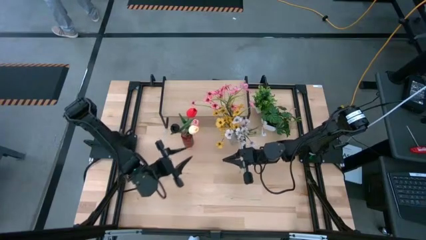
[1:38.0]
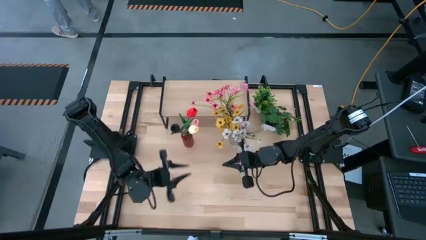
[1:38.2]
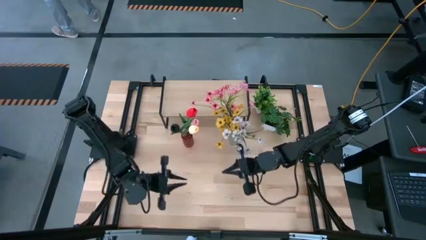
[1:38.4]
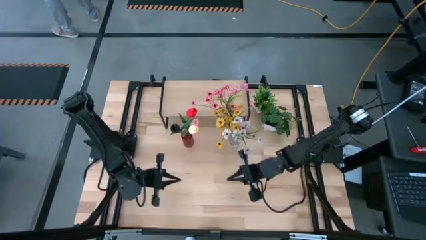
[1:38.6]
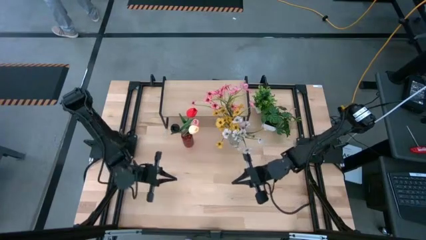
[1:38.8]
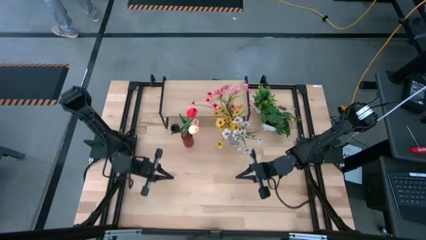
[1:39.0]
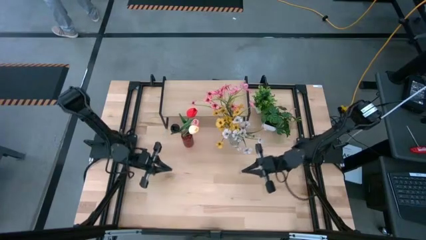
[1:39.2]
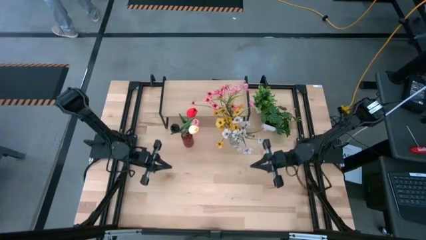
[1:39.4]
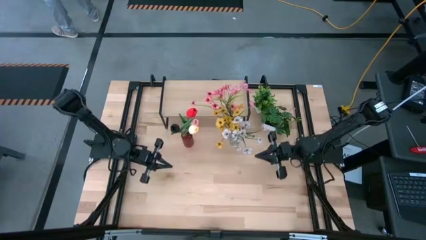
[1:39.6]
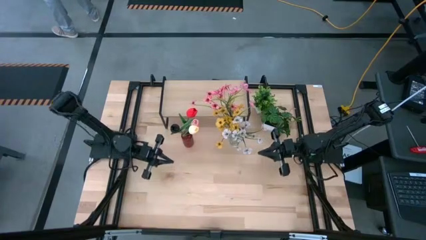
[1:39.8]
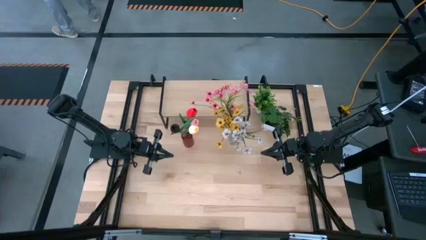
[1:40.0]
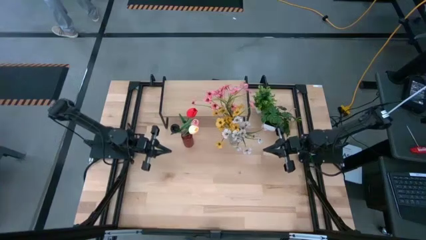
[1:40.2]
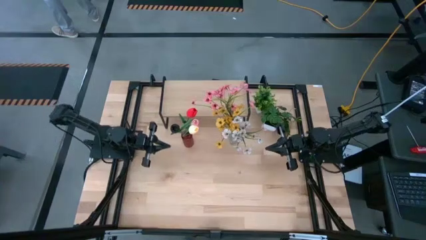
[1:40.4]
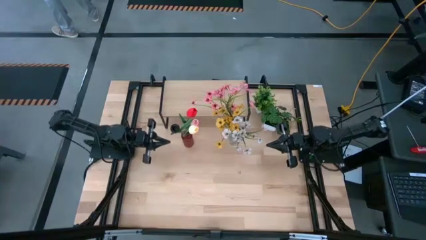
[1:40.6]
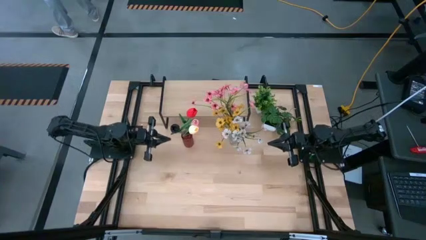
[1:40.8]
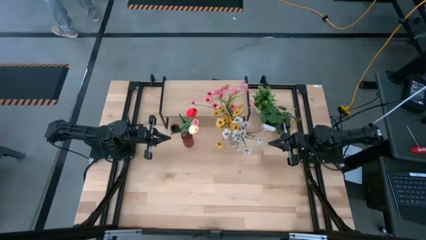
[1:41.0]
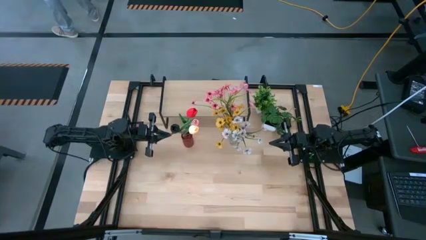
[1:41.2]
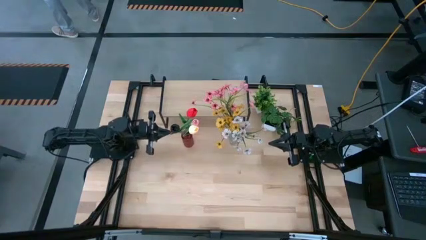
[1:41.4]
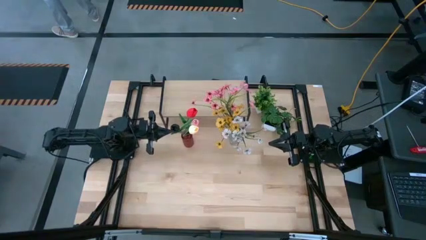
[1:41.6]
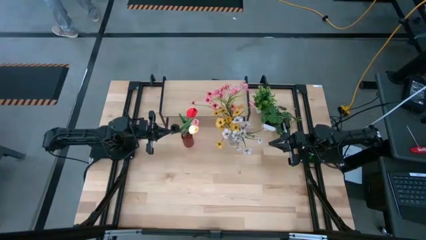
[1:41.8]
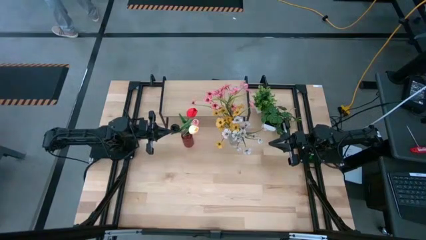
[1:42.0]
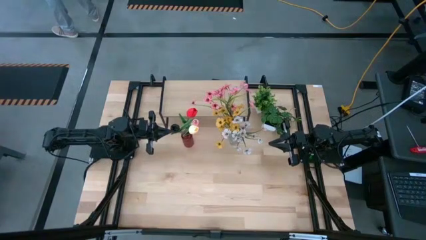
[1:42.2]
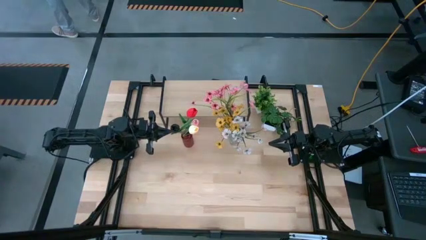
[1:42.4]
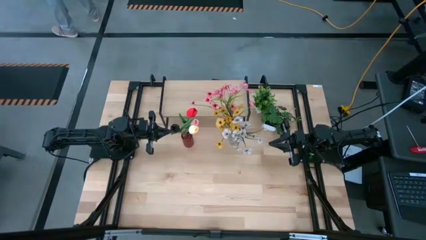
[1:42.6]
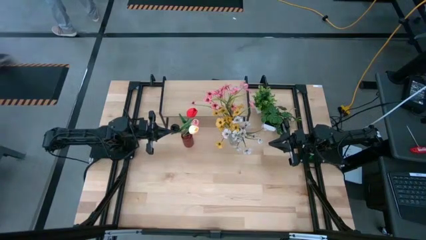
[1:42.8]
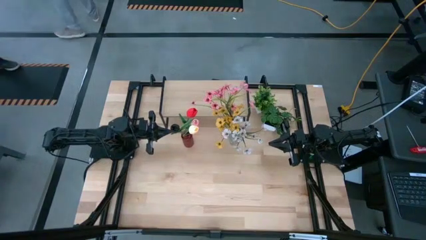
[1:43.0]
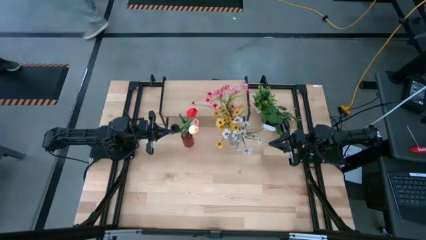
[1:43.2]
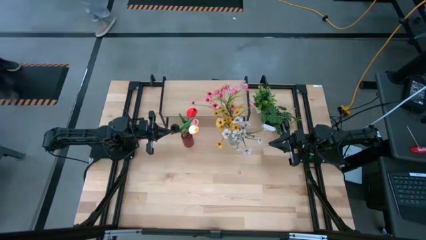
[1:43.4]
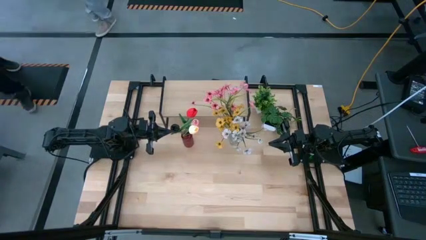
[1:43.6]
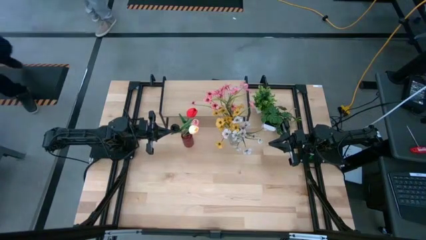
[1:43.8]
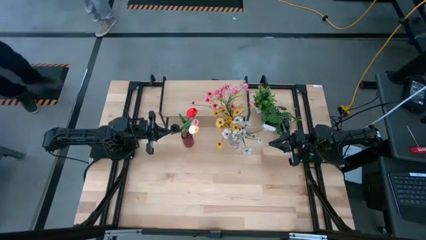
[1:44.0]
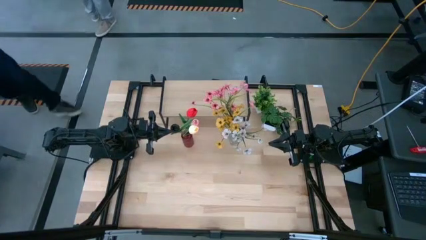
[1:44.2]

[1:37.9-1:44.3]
Task: Pick and place flowers into a vace then onto a shelf
Return to Home Position

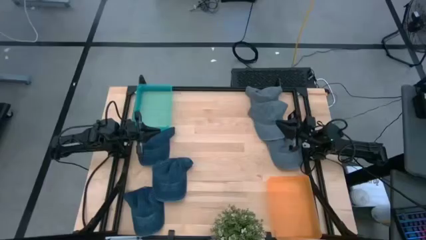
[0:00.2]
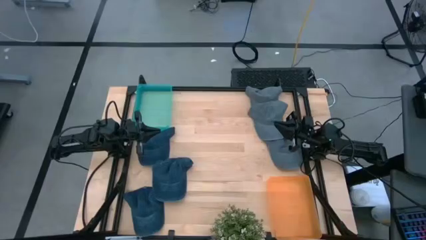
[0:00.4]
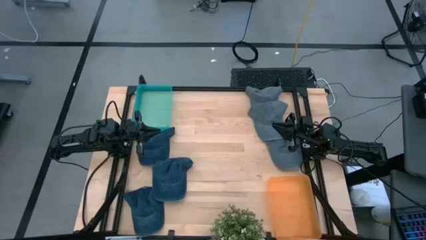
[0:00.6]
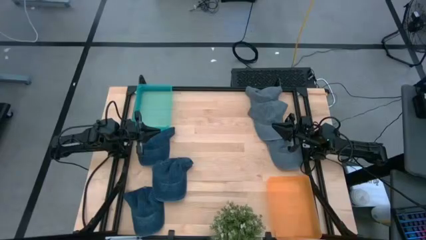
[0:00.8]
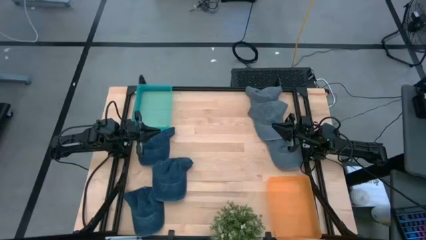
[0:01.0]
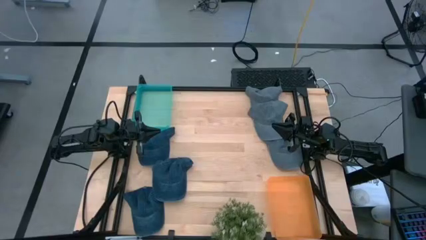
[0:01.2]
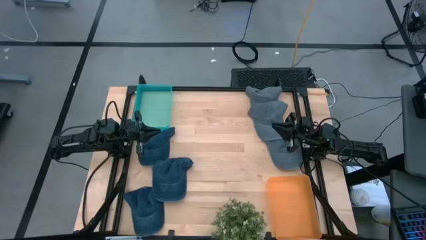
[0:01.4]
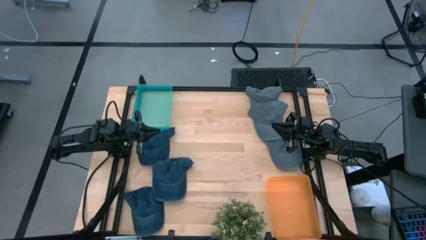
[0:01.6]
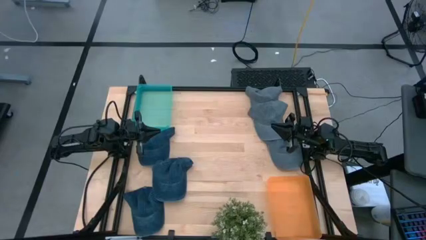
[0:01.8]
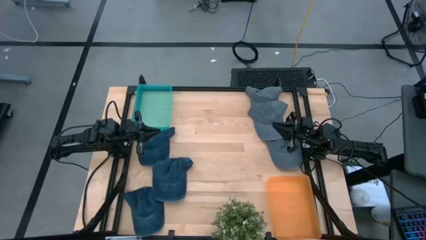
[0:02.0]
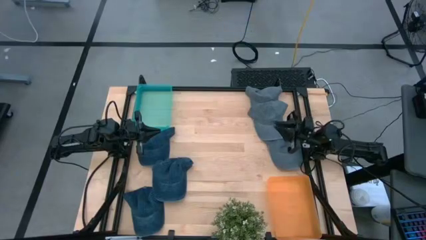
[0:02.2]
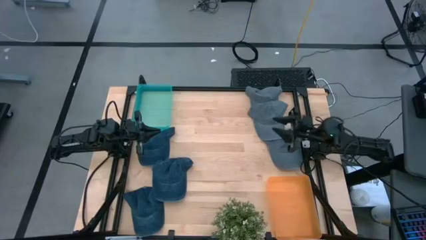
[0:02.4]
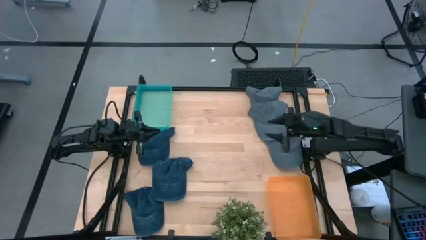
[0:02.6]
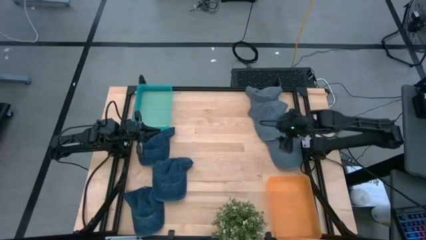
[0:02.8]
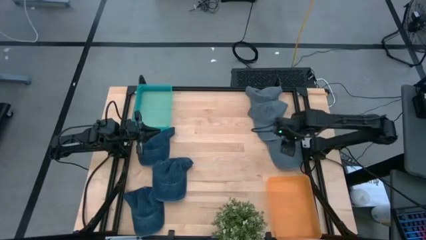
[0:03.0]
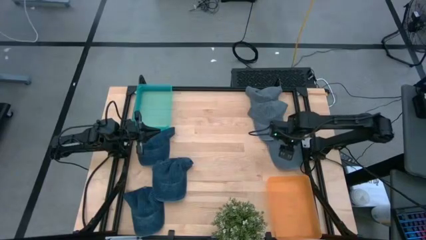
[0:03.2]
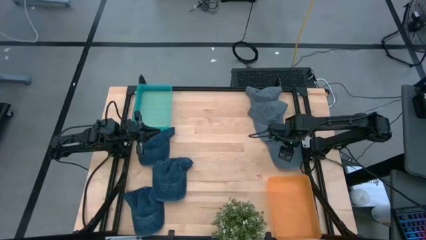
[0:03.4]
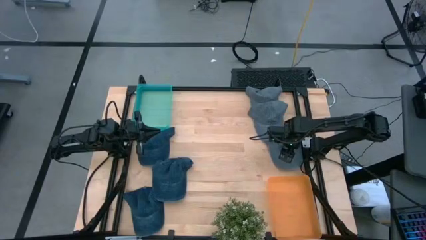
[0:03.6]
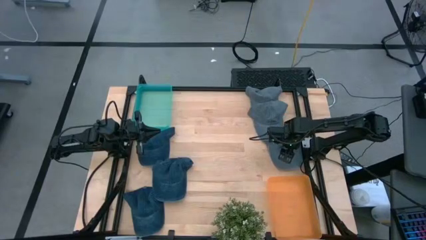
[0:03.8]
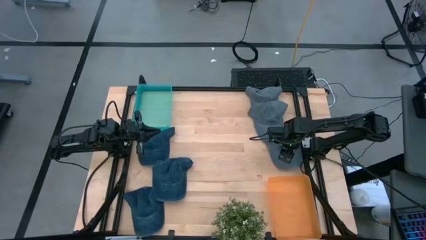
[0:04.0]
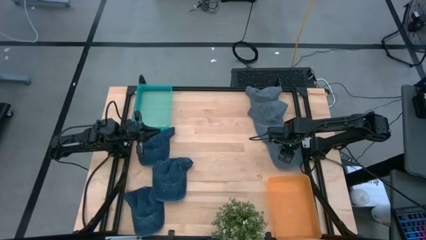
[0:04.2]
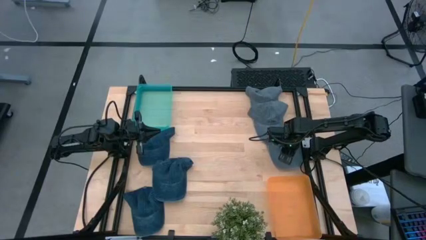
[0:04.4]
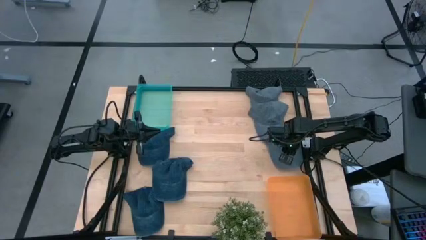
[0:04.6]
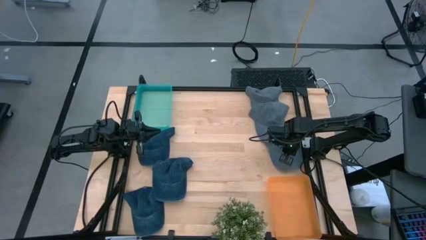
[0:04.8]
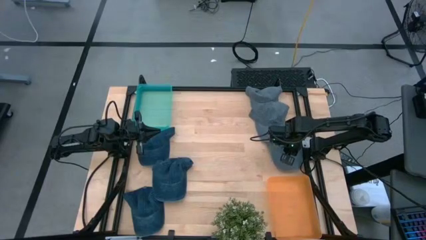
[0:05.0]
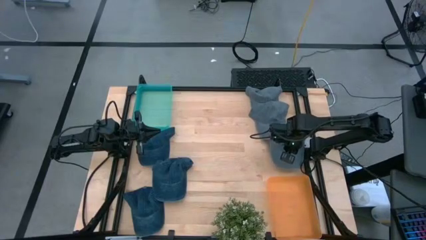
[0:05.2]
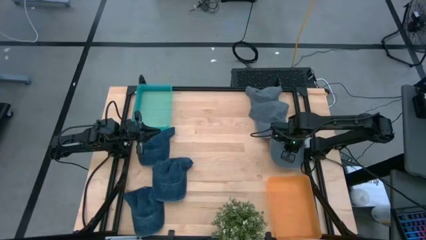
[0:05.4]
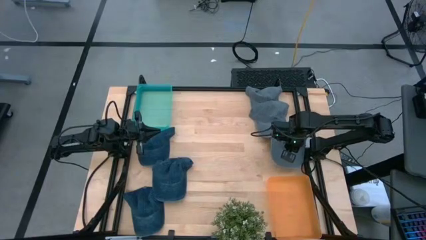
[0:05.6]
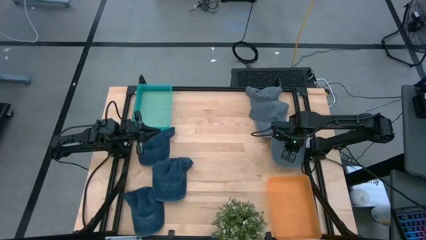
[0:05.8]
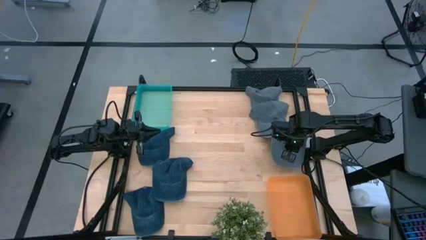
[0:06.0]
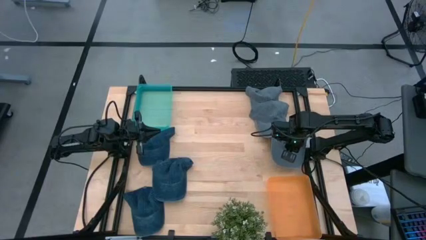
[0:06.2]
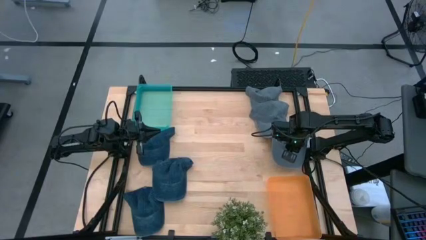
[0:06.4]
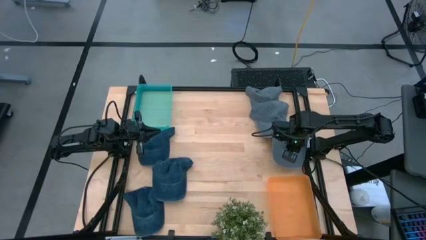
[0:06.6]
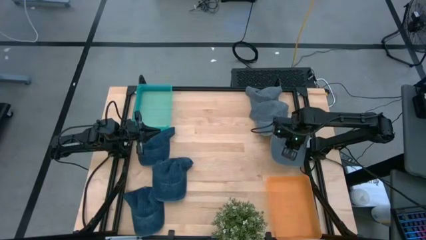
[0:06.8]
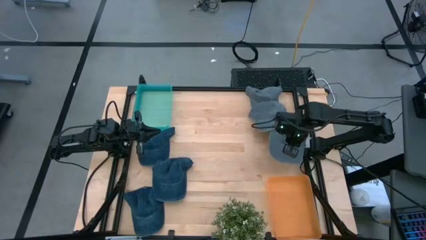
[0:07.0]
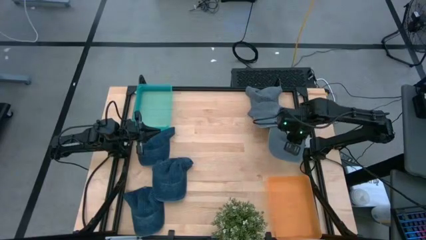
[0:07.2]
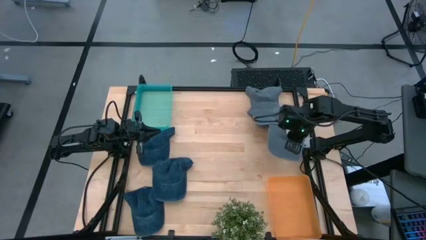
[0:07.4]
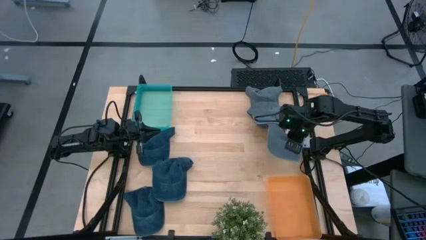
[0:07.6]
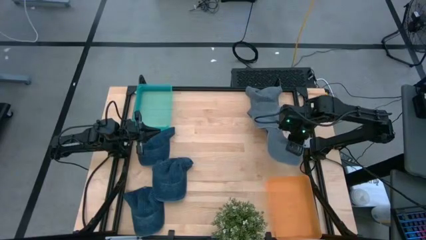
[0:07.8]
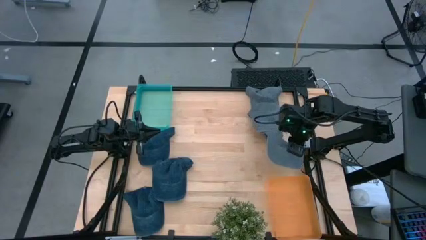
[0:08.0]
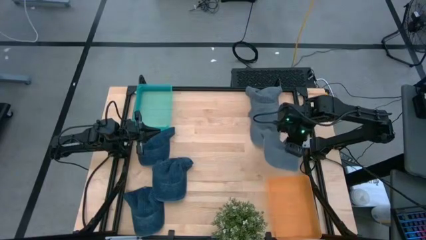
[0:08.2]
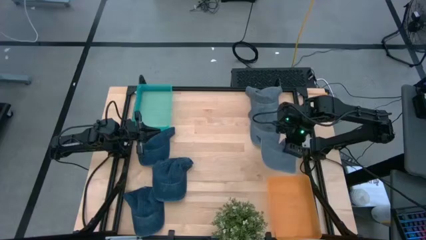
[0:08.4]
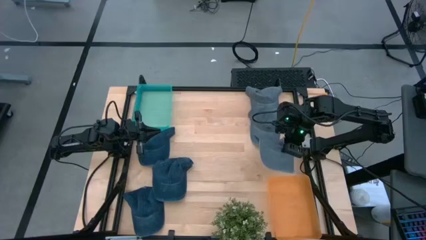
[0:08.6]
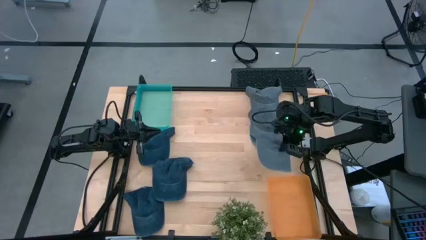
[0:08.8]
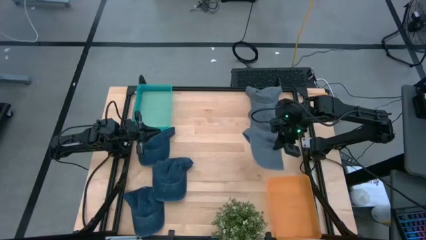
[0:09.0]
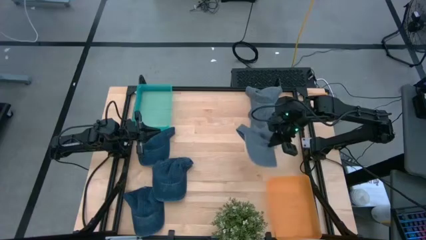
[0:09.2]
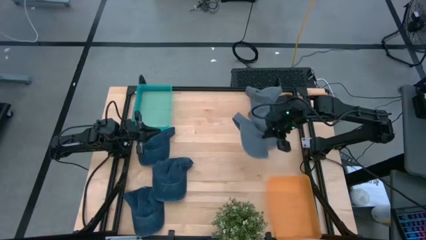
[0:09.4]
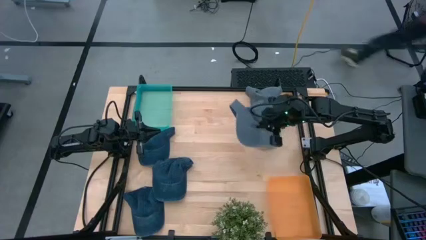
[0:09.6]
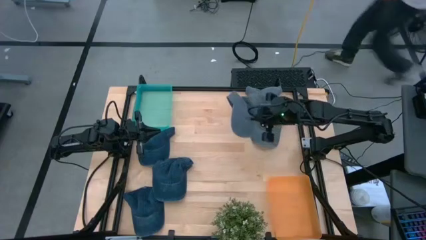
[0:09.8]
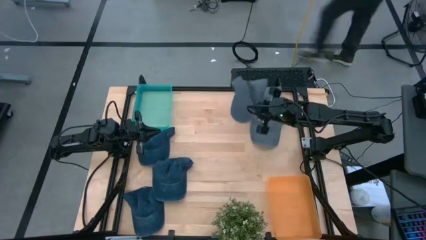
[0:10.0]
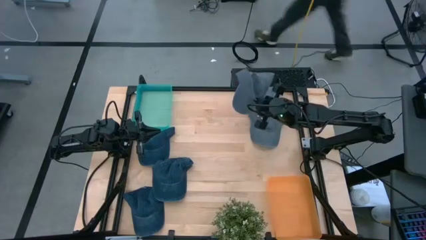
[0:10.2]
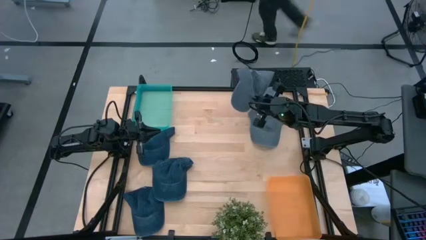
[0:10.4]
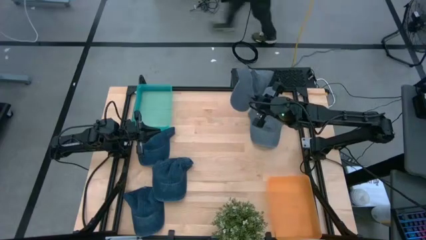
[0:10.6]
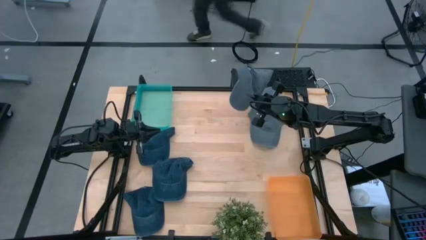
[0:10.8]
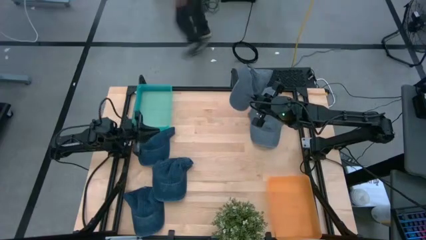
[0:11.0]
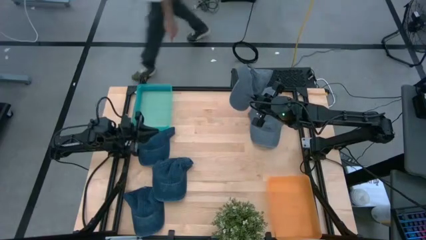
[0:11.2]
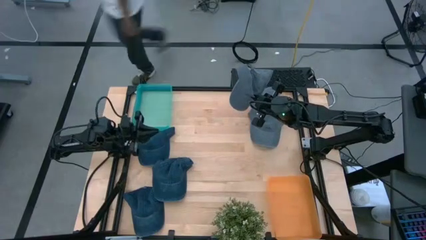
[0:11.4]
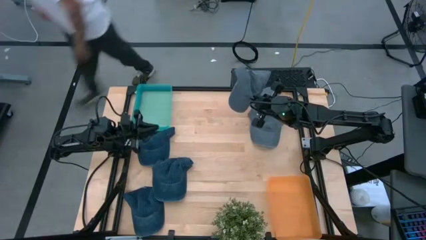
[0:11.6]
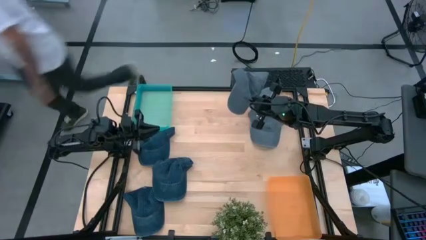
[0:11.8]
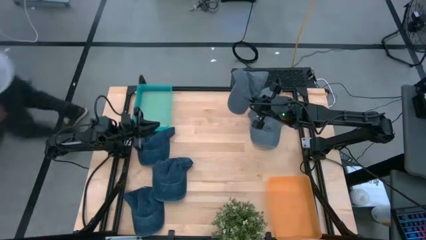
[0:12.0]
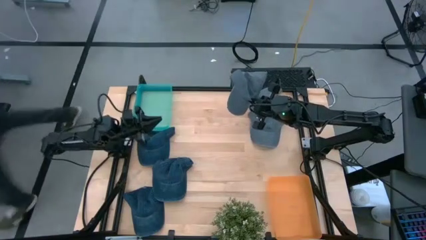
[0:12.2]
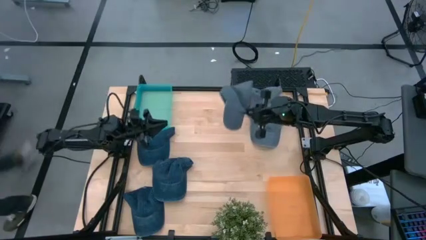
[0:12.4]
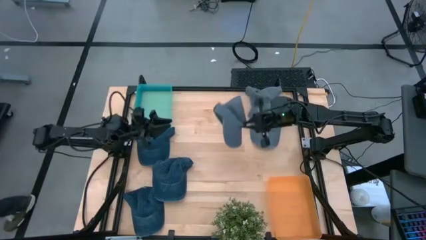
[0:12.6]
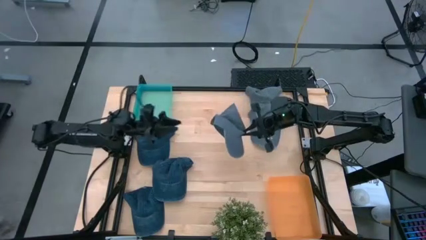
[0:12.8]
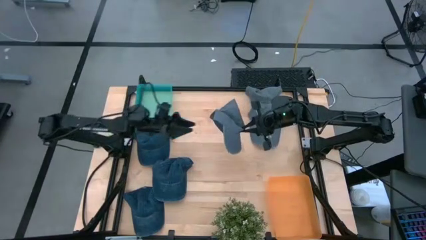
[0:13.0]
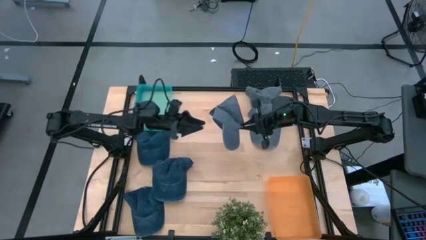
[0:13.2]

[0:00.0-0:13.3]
Task: Pick & Place hat
Put the bottom gray cap into the green bin
